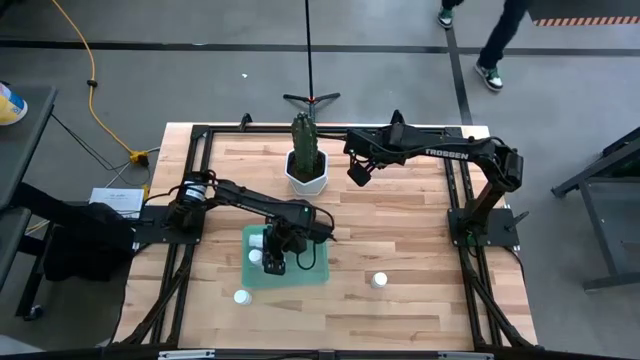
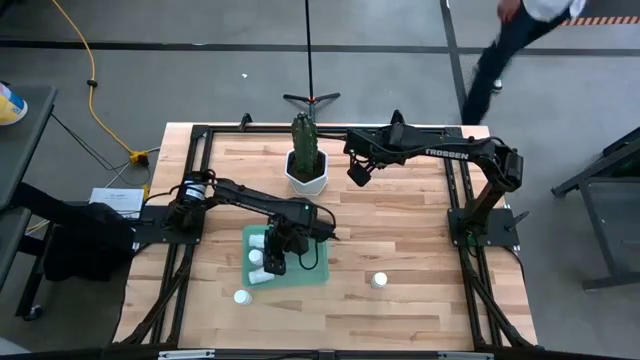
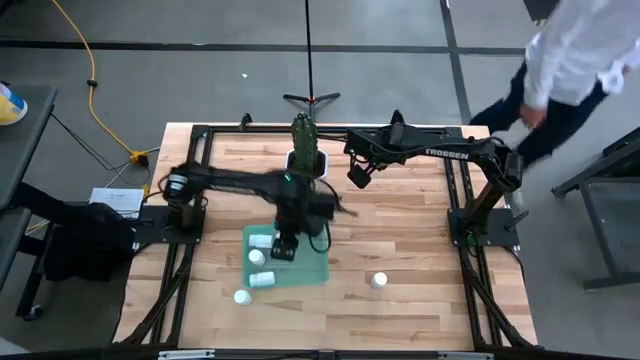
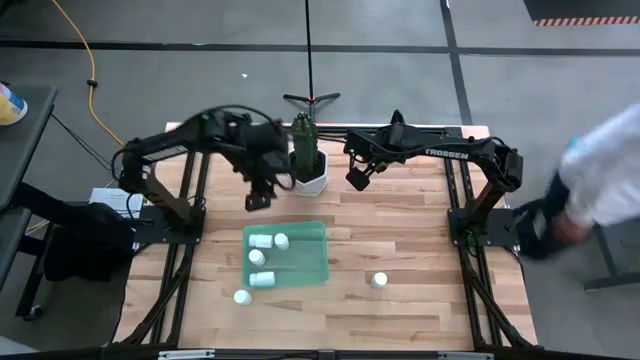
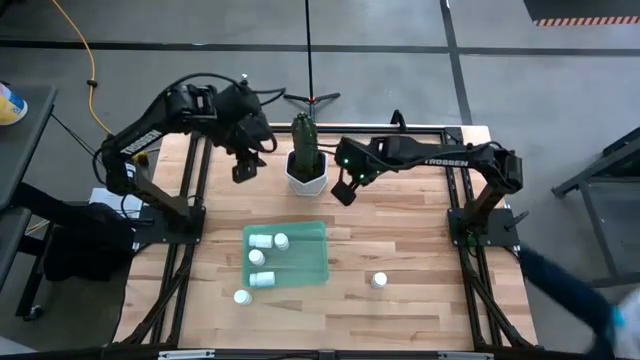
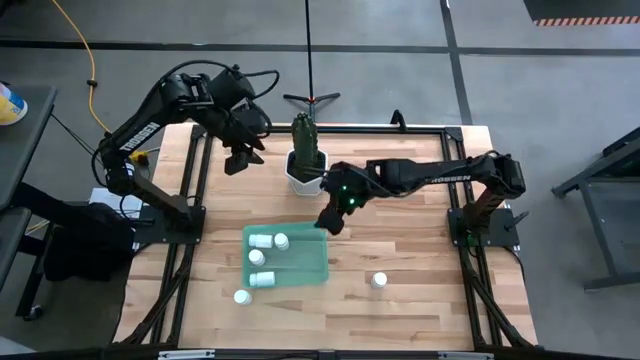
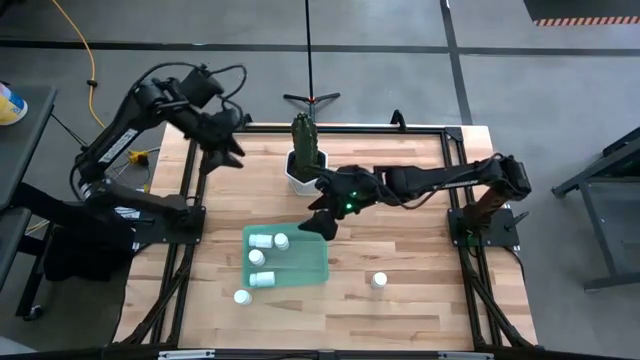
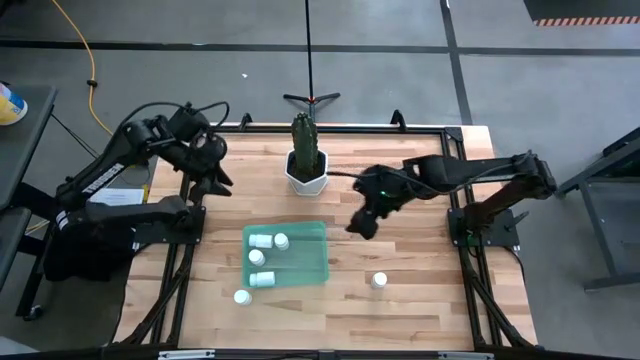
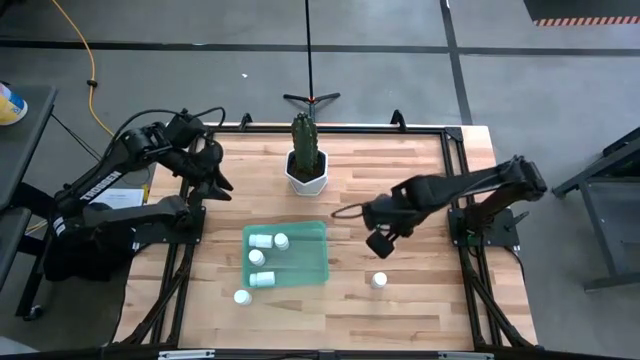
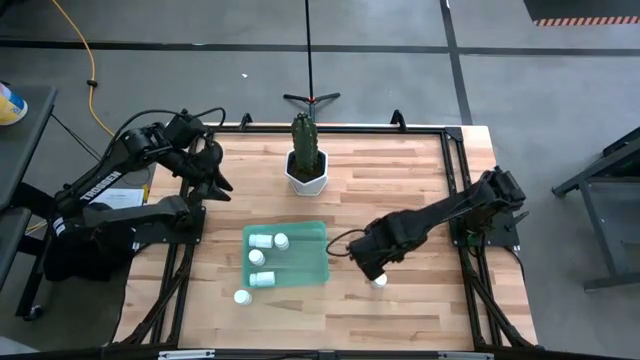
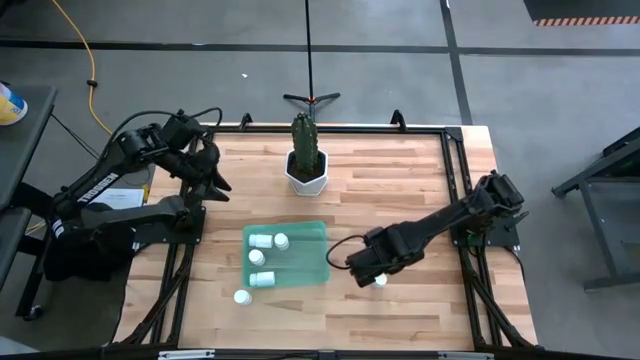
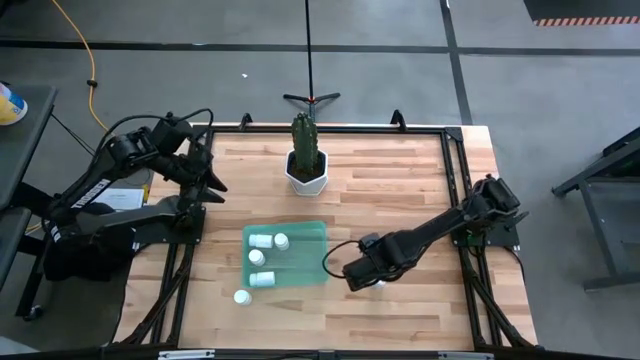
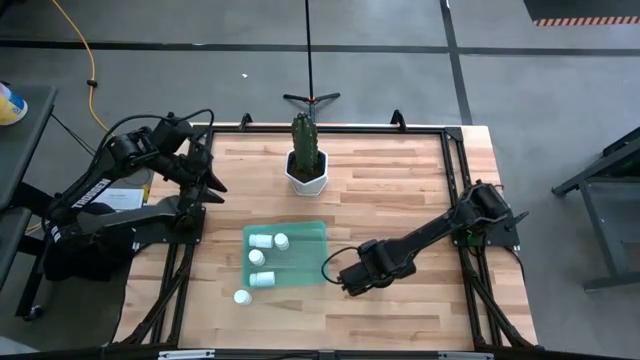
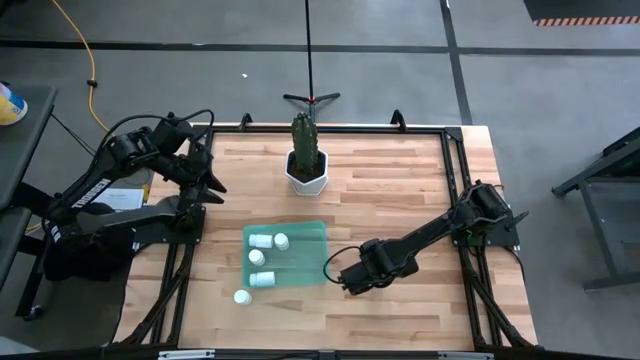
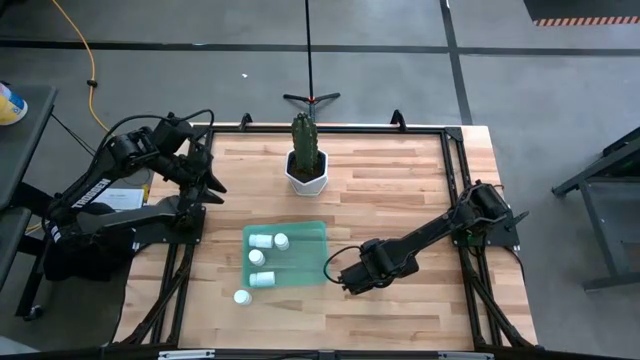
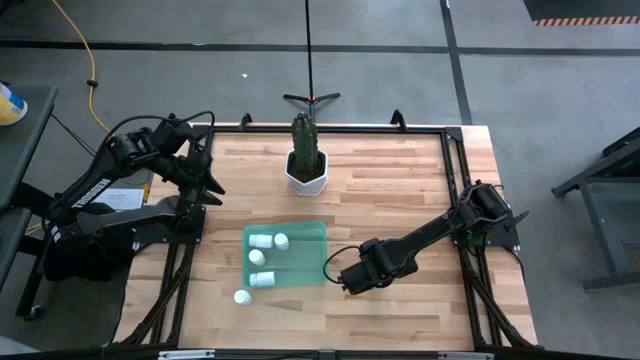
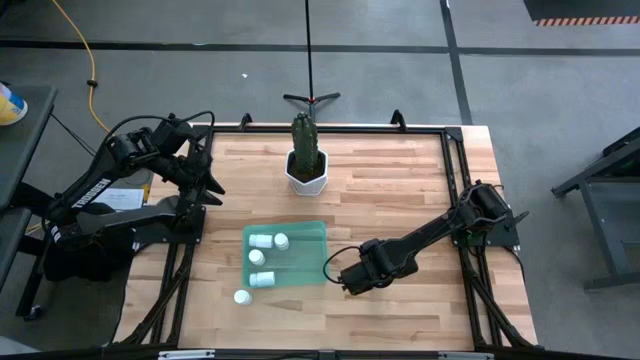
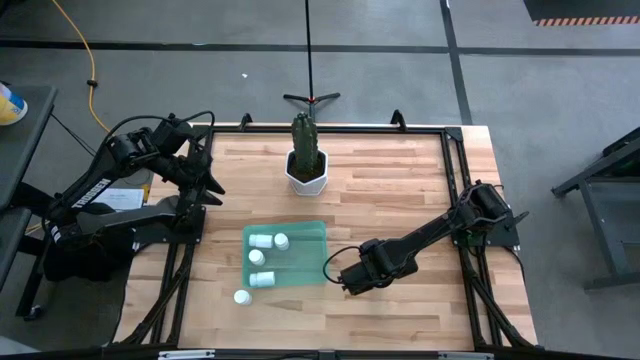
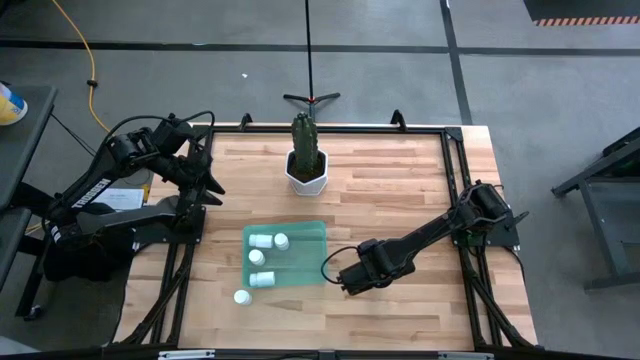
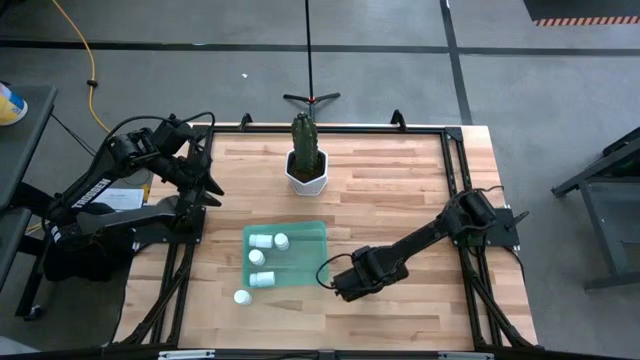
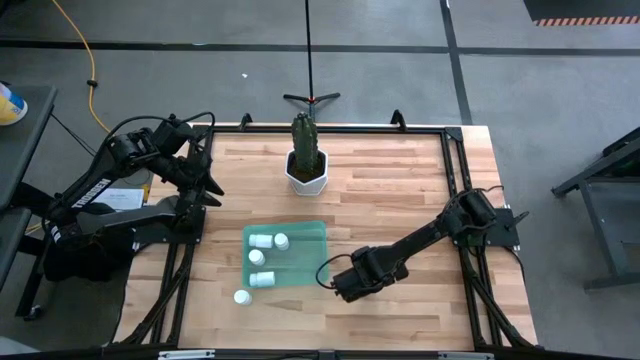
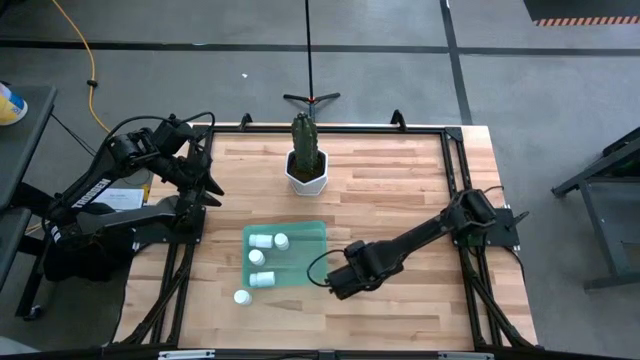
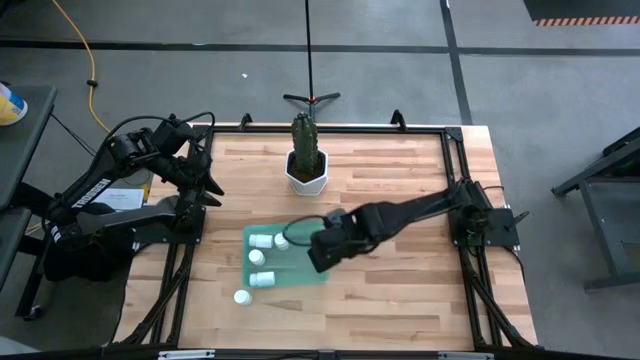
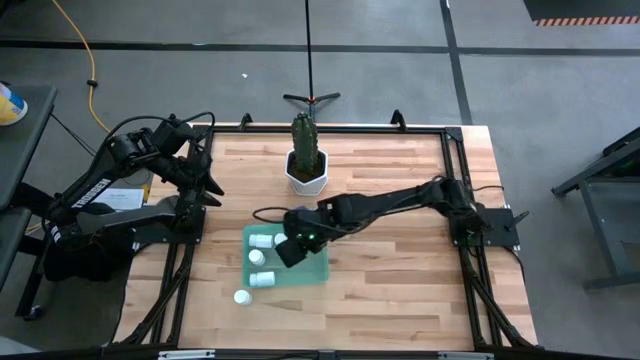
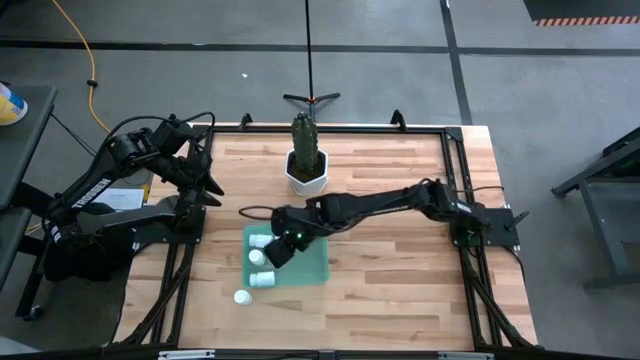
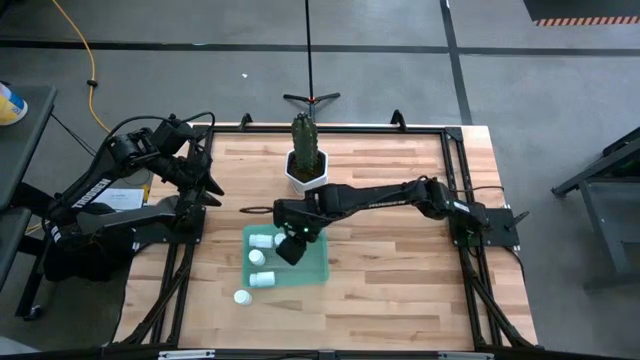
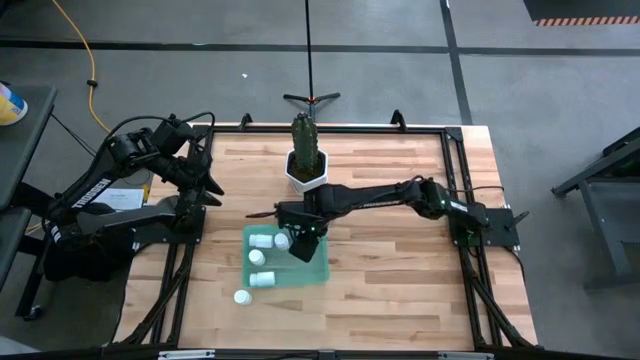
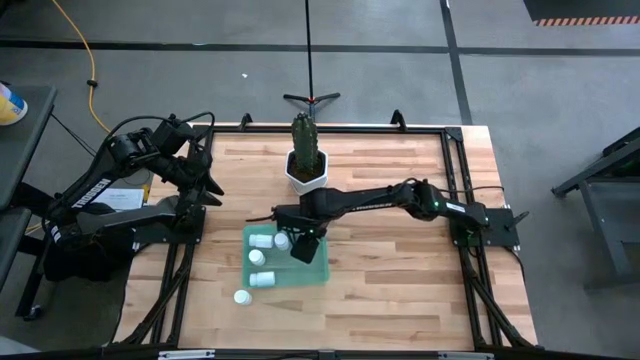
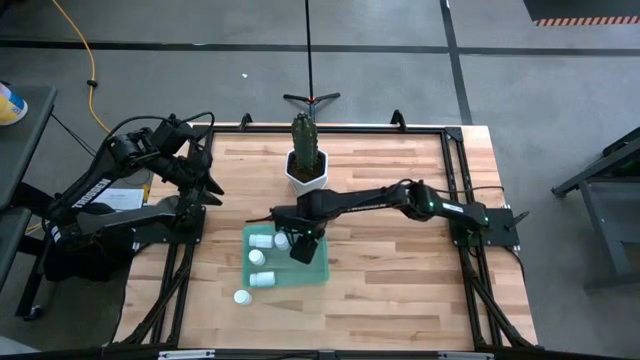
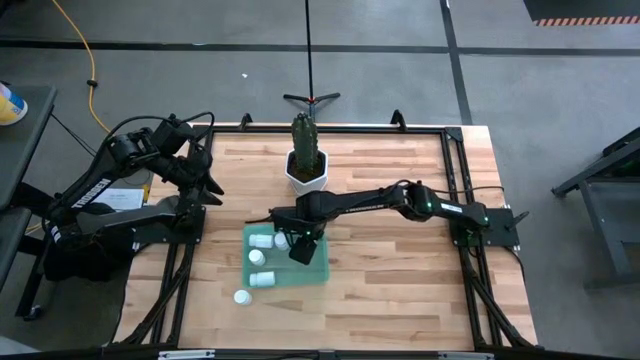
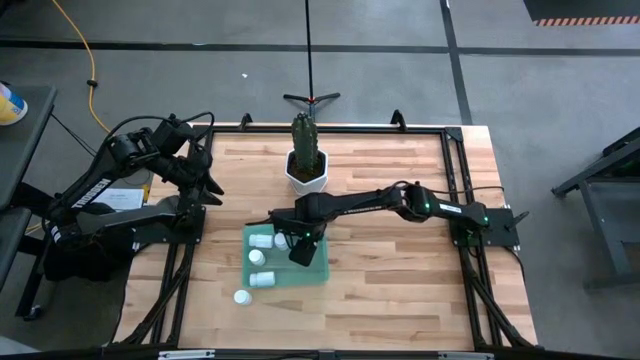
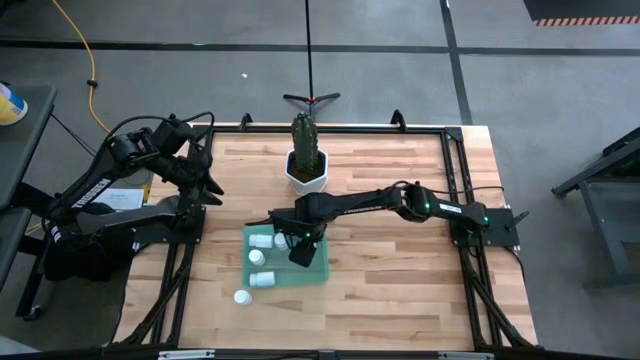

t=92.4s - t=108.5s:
Task: Pick and place pill bottles into a basket
Put the white pill bottle into the green bin

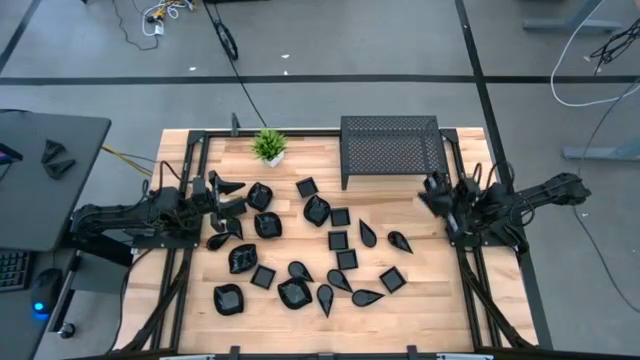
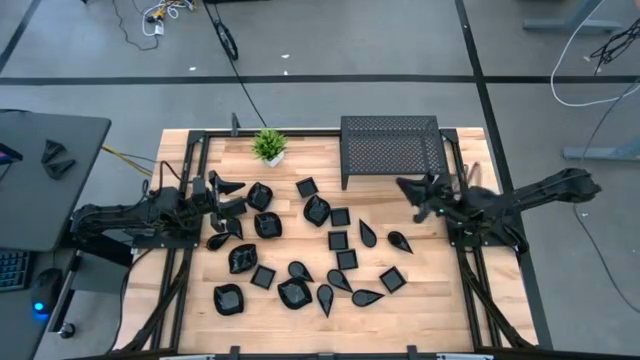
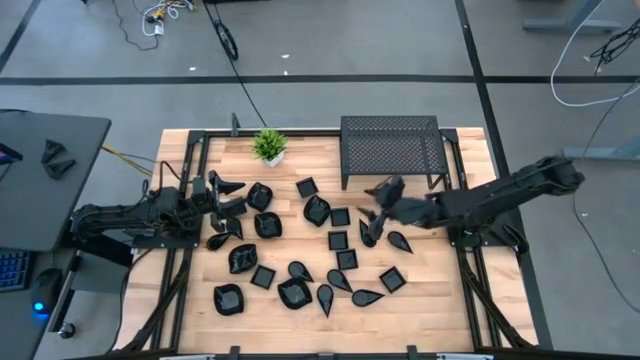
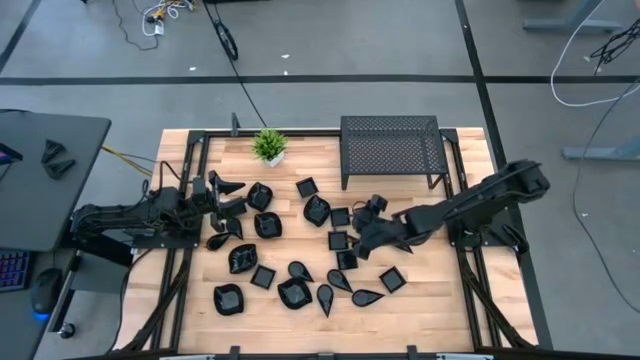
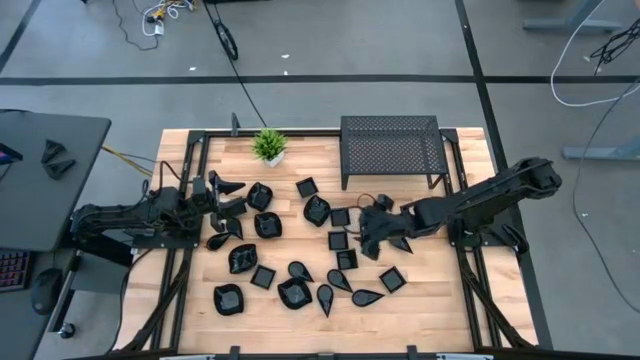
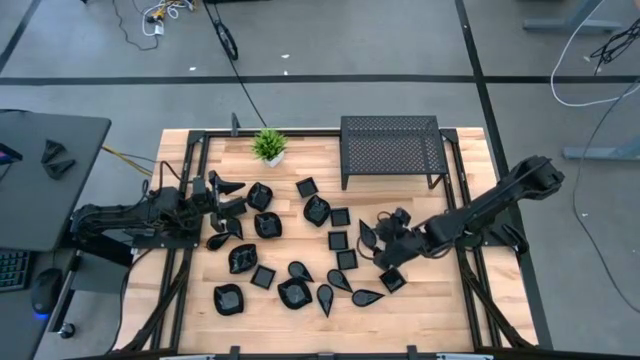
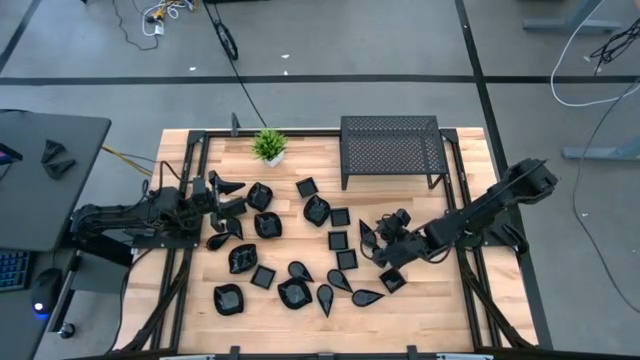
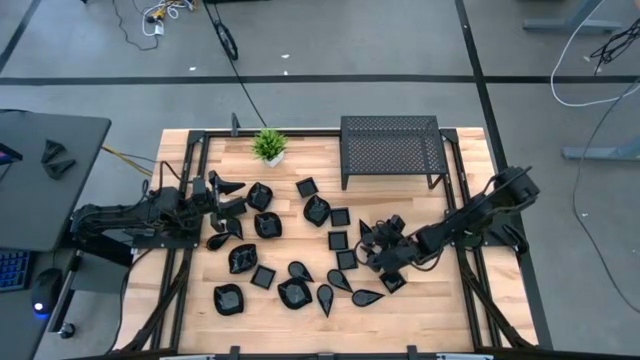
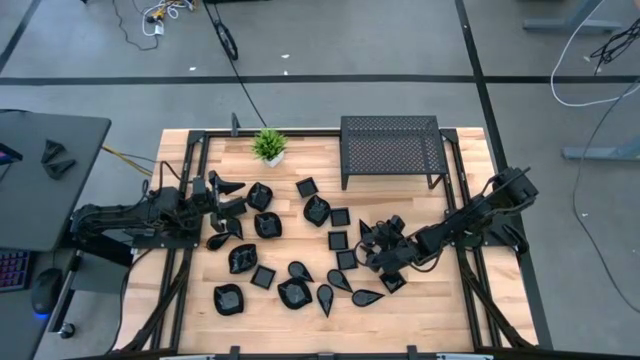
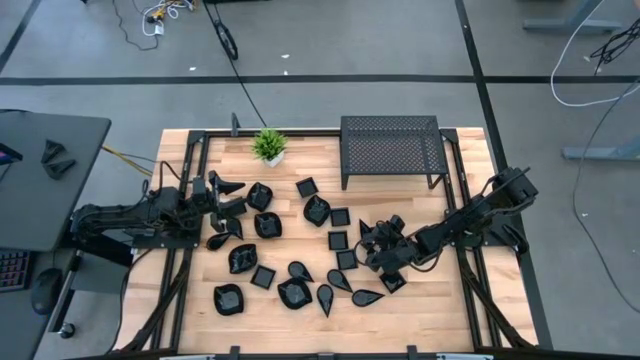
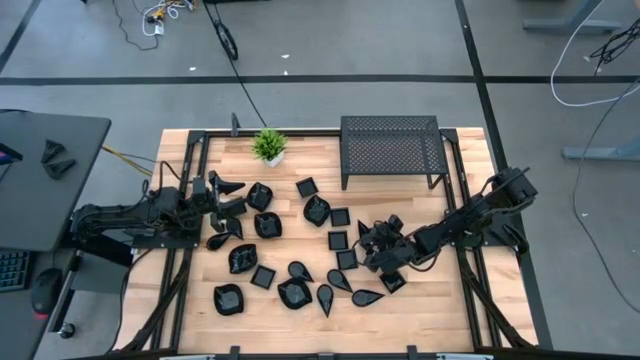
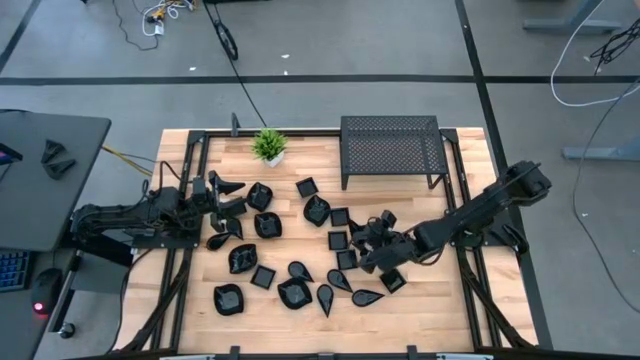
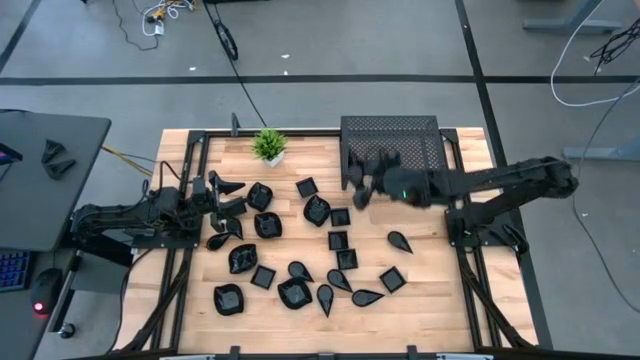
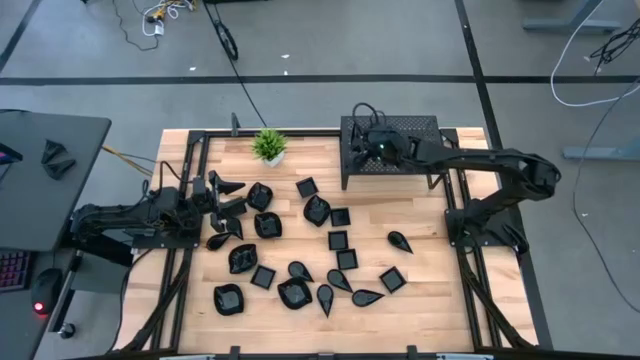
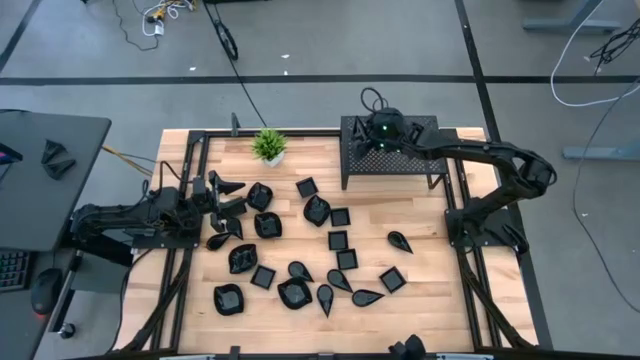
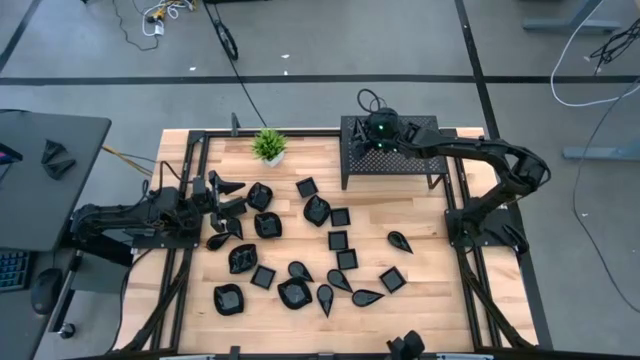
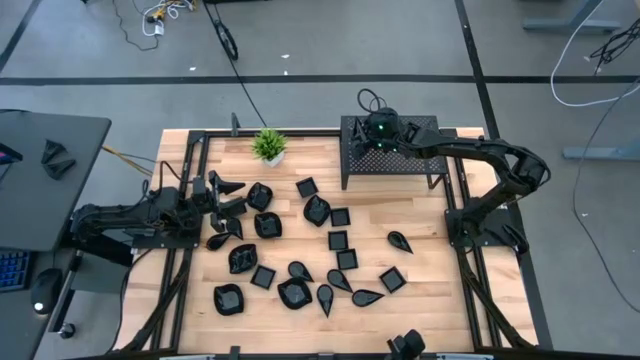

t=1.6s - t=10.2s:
Task: Pick & Place Mini shaped plates
Put the black drop-shaped plate on the shelf
